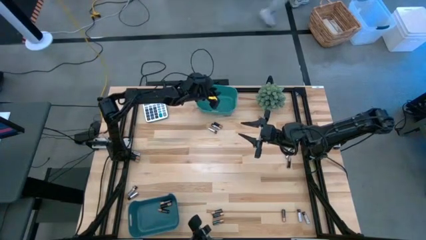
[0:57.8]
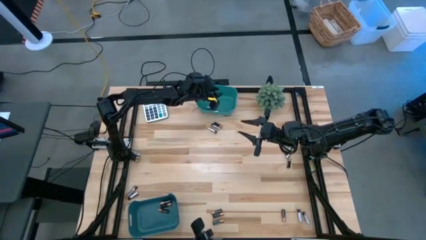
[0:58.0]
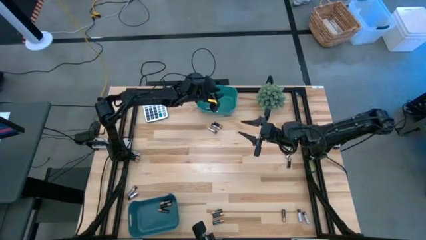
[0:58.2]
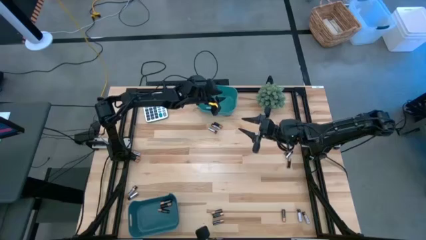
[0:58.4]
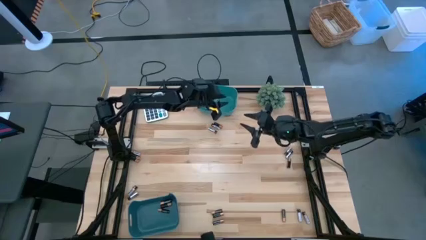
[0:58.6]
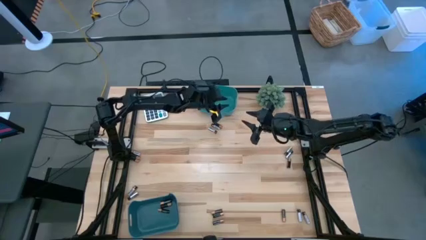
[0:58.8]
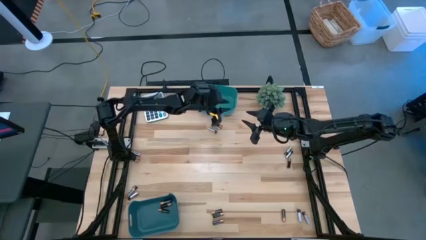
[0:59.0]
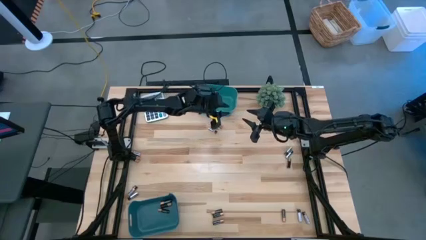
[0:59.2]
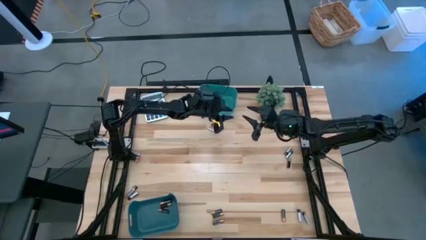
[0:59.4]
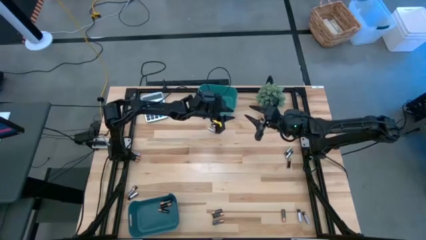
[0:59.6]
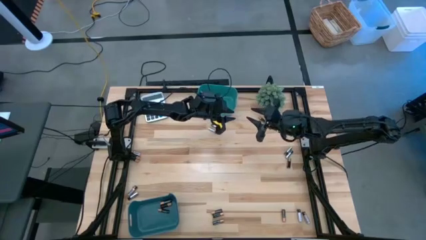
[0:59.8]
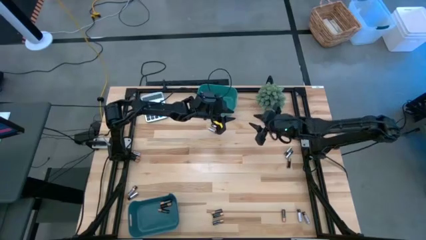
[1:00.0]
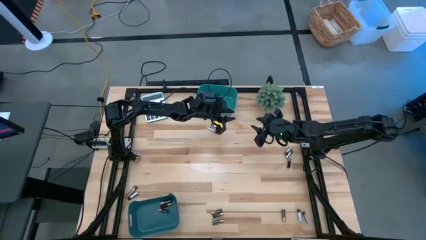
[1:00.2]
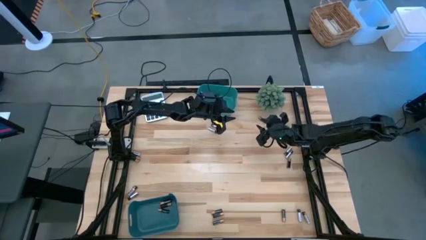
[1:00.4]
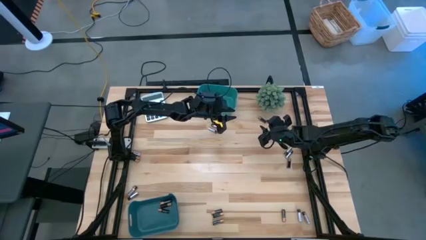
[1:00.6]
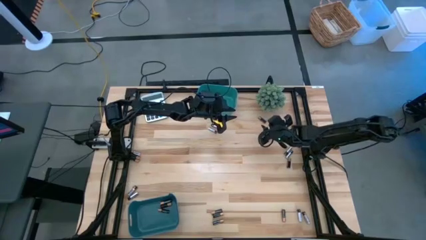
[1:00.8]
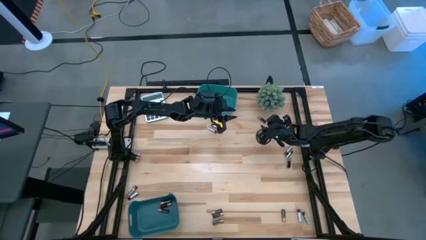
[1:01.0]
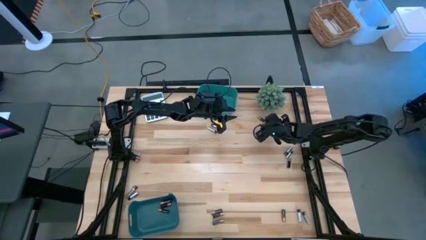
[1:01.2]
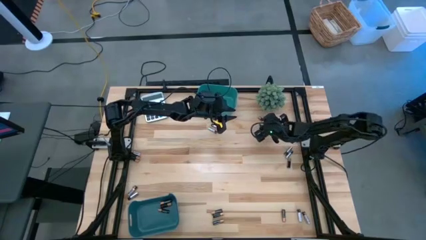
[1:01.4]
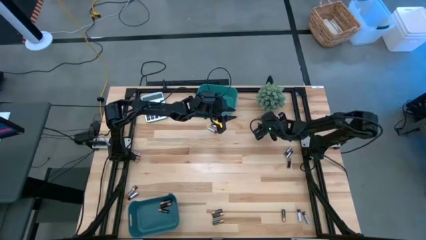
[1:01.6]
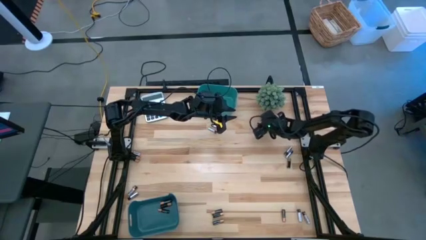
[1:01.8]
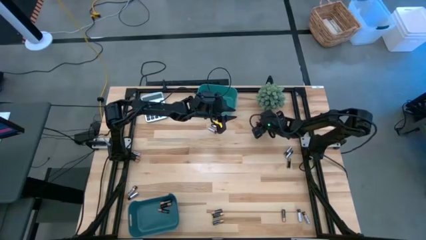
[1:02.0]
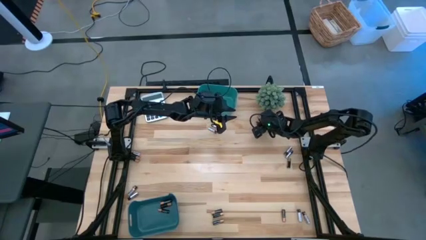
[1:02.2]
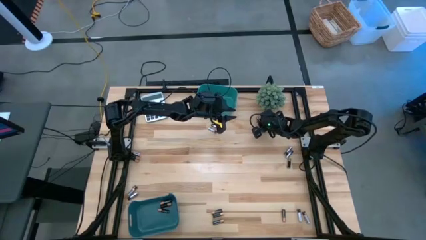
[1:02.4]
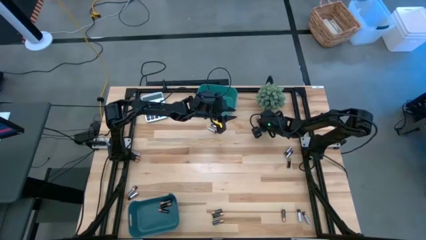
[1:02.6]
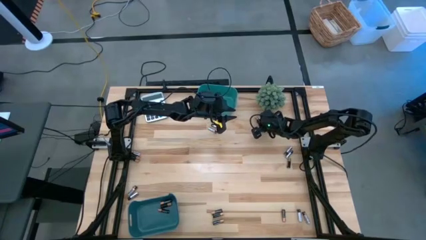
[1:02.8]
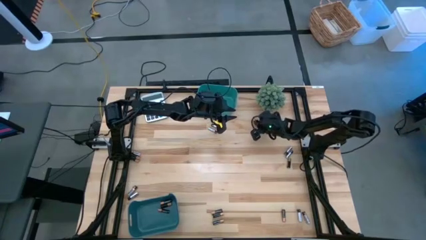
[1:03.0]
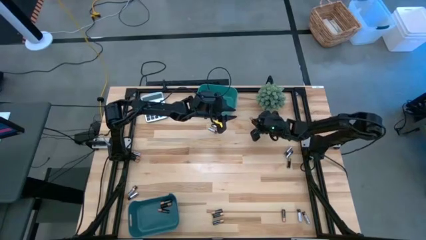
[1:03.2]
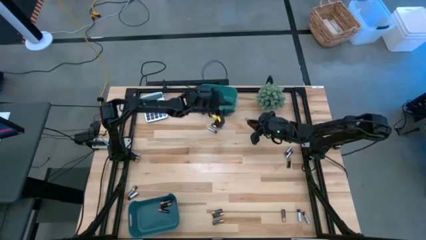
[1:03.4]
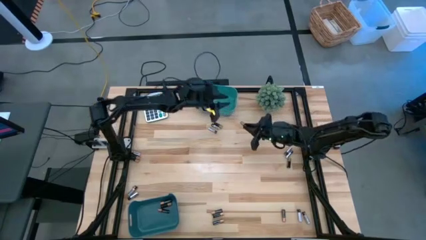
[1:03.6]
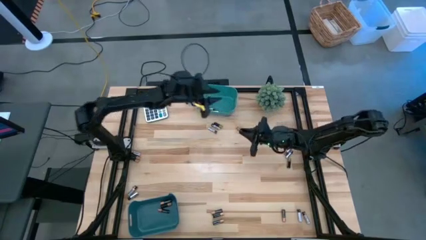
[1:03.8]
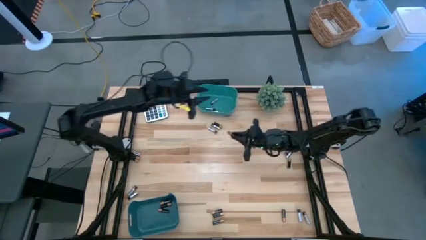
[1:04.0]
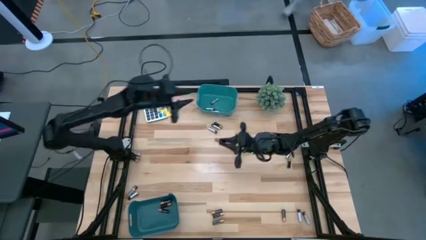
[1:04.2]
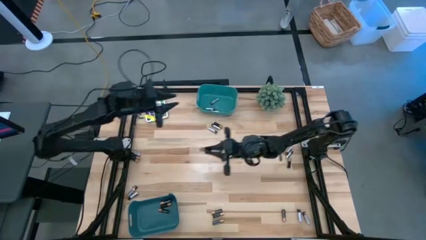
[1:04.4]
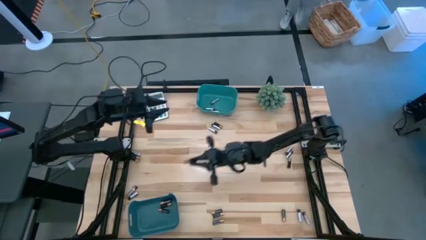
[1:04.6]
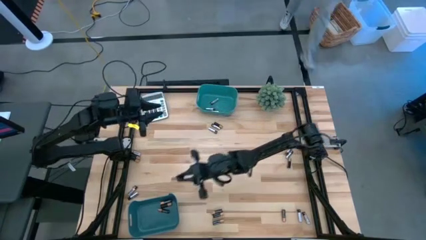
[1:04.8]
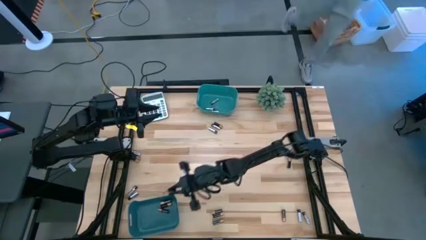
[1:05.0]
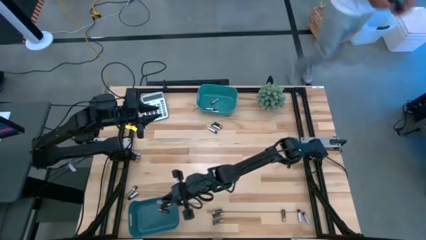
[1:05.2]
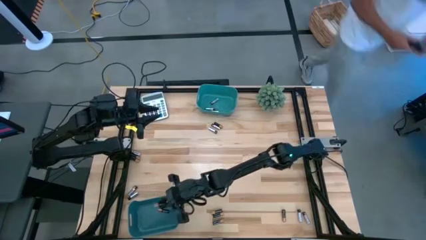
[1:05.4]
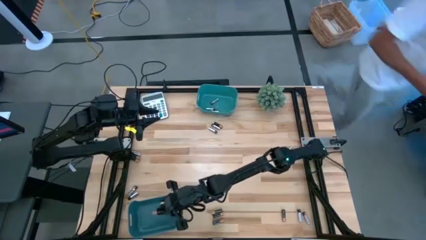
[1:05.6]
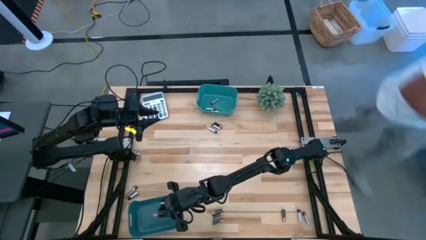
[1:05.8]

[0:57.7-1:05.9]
Task: Sort batteries
Put the gold battery into the bottom green bin

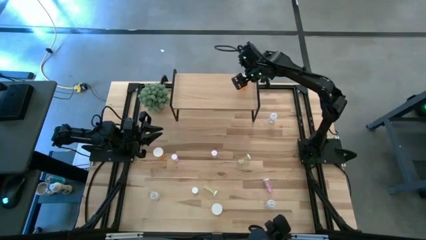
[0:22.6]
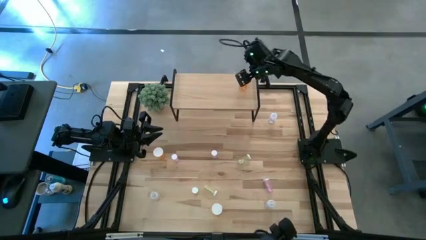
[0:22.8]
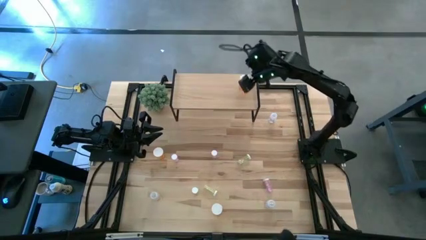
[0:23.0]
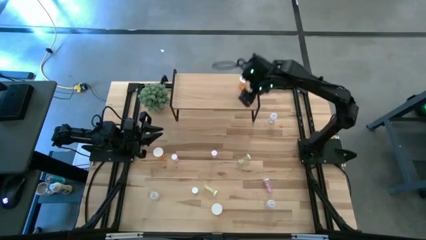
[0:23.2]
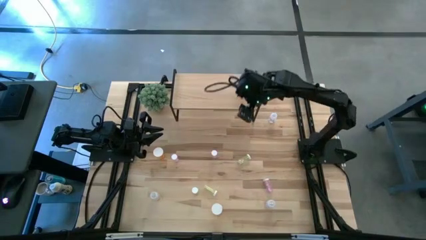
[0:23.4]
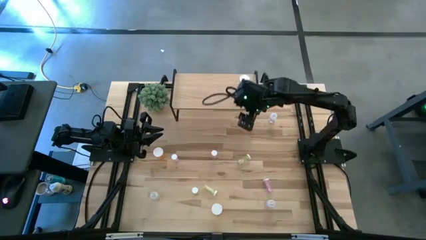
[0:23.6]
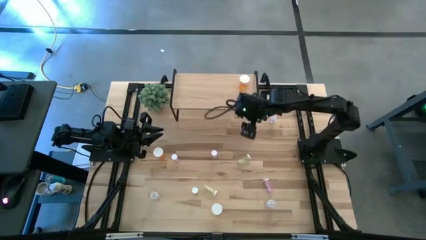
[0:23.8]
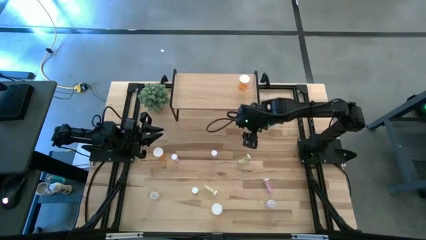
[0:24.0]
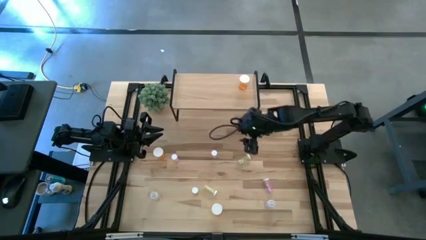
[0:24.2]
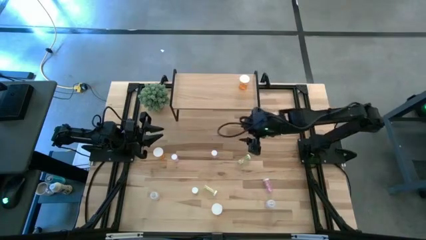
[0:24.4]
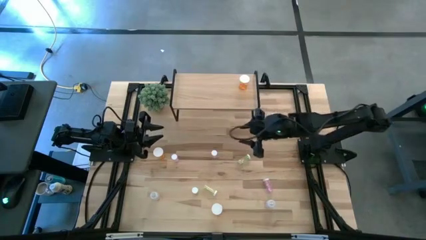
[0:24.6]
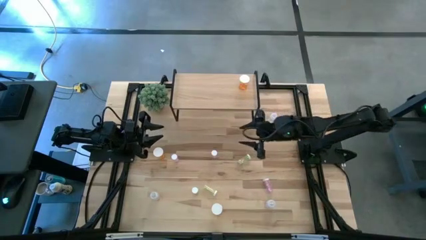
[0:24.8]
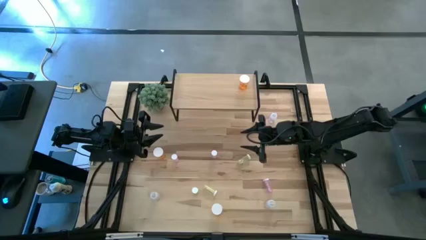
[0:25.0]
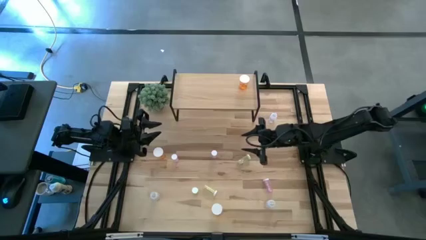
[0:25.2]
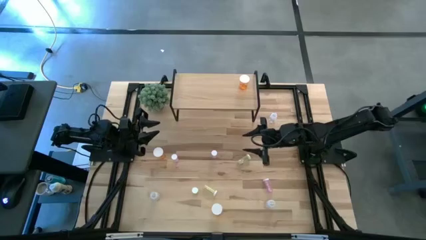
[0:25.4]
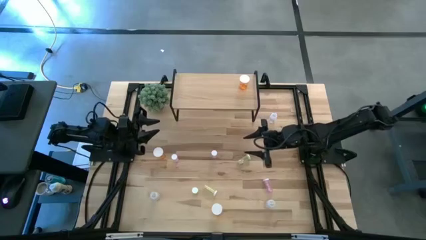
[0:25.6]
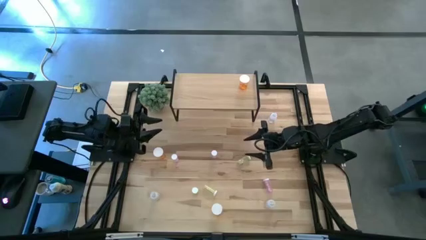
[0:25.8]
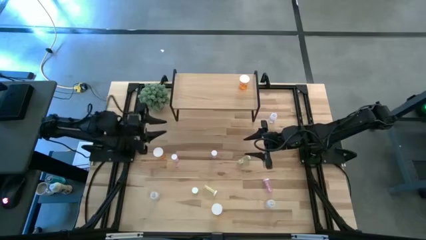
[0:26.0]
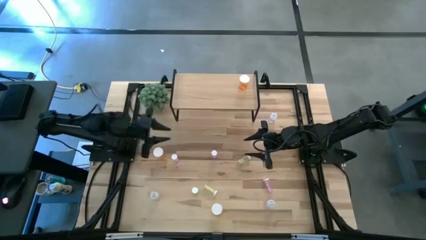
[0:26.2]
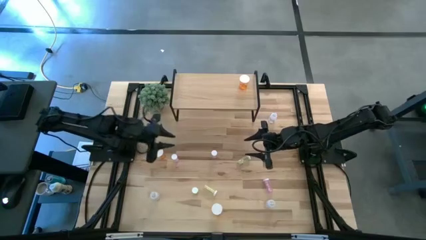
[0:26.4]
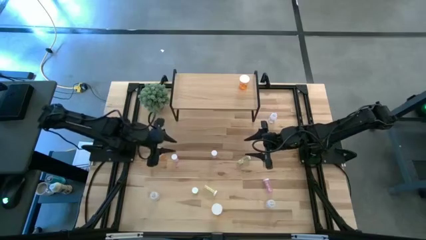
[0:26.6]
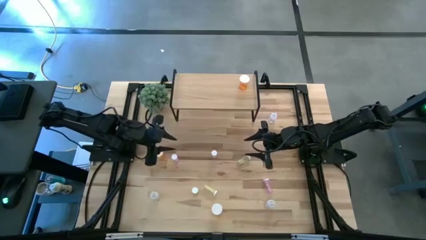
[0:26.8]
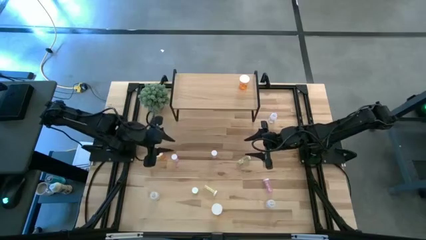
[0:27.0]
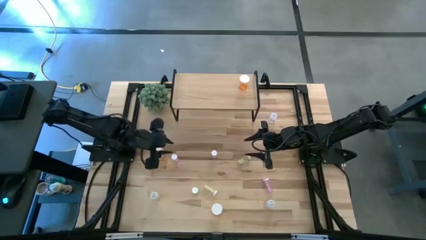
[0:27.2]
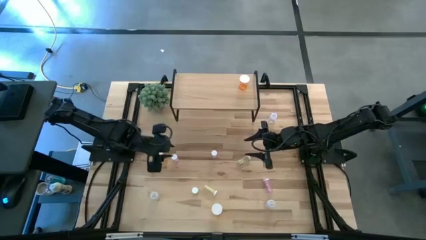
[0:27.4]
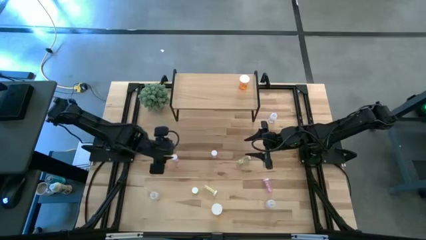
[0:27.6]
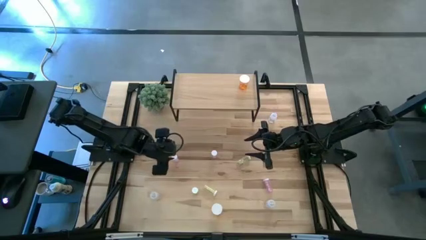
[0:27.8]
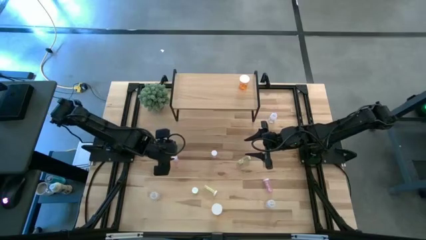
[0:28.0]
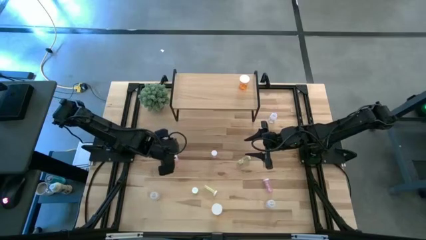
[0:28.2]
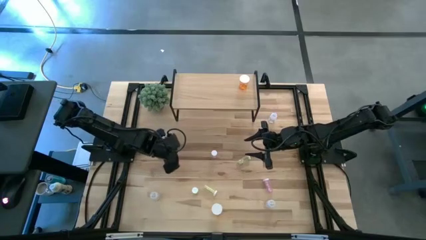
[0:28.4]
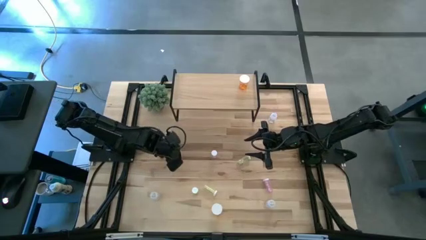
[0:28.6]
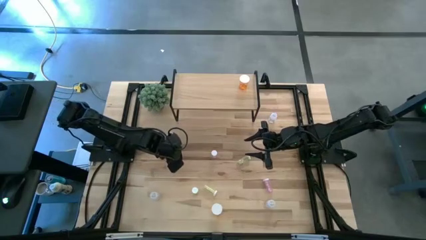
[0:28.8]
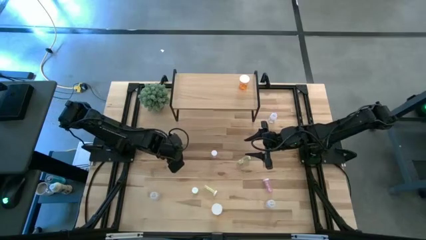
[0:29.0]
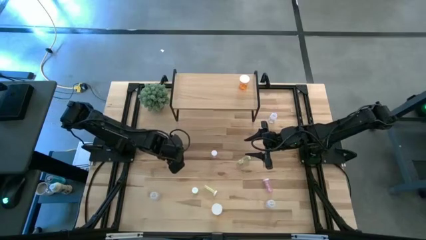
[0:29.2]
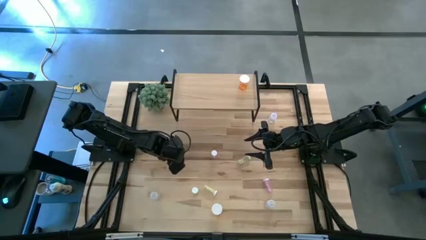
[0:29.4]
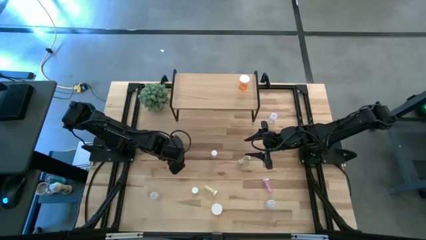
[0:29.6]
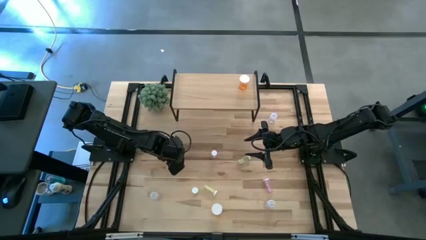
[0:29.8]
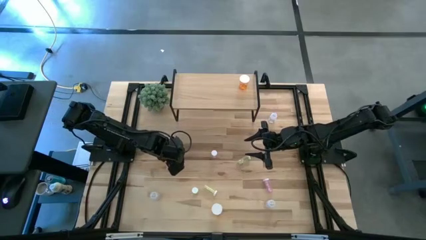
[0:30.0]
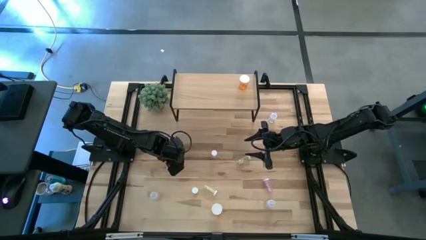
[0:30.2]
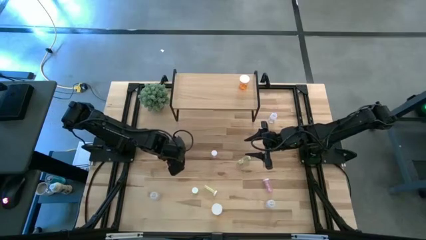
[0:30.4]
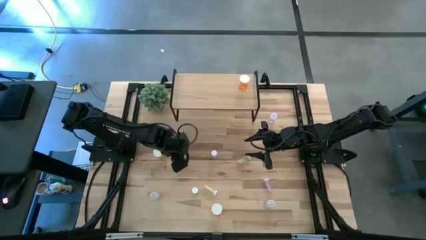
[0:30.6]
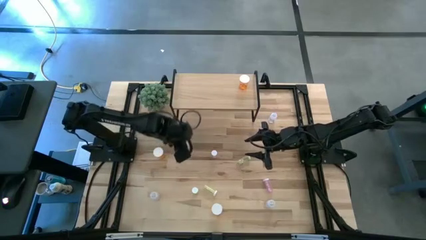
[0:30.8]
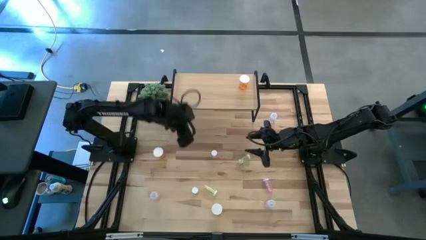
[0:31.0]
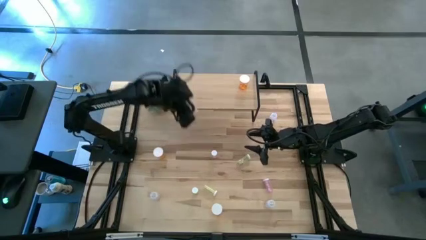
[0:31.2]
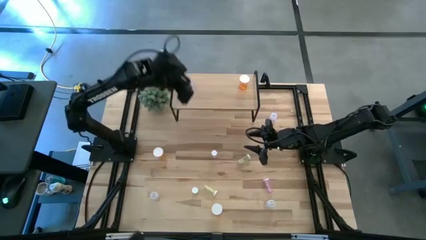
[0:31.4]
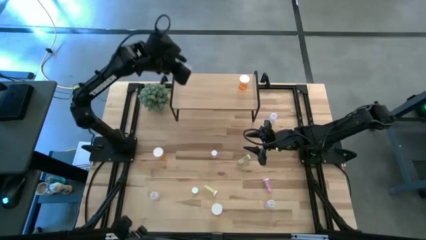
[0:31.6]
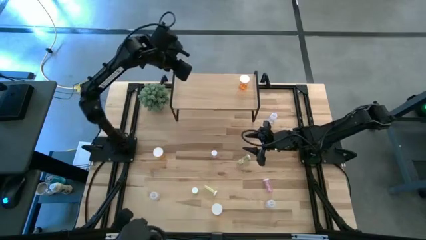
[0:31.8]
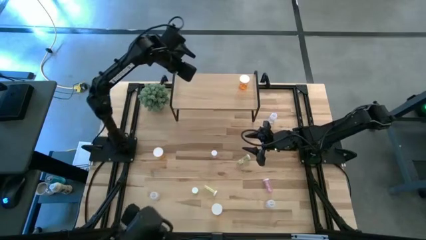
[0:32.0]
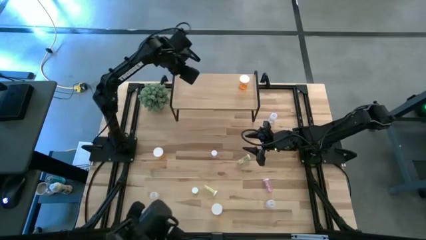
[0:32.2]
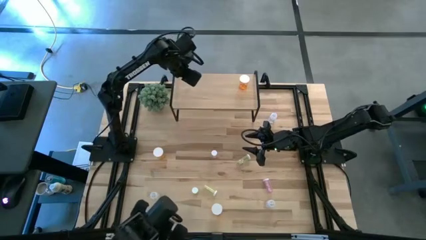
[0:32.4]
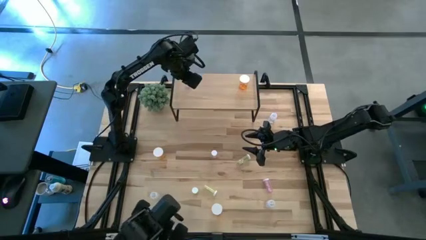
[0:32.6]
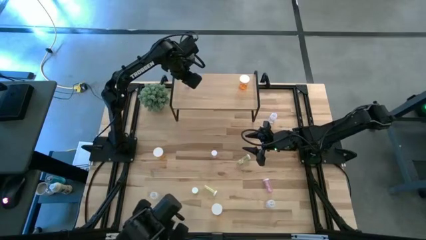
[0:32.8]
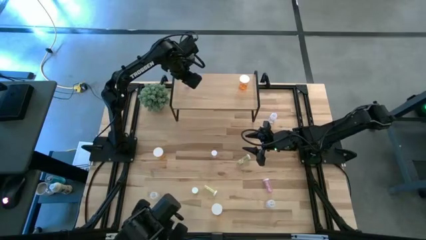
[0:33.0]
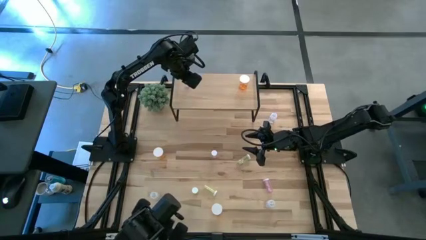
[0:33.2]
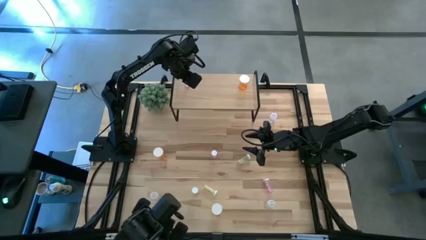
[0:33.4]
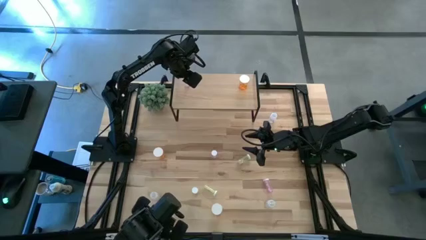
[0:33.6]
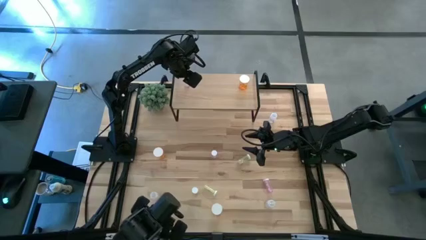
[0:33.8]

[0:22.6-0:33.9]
Task: Pick and place medicine bottles onto shelf by color
Put the top left pink pill bottle on the shelf
